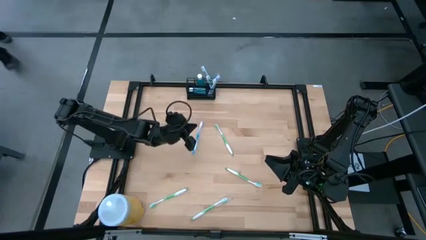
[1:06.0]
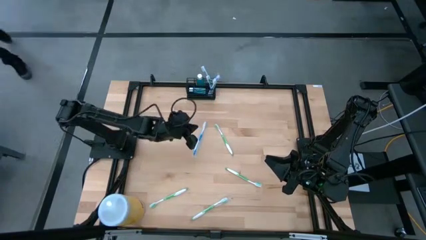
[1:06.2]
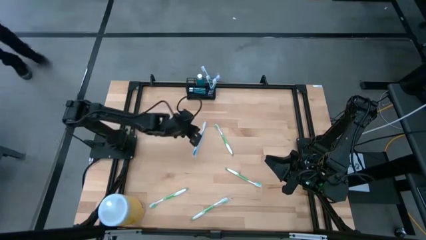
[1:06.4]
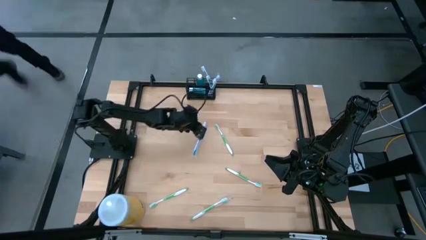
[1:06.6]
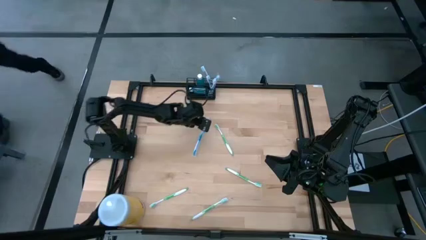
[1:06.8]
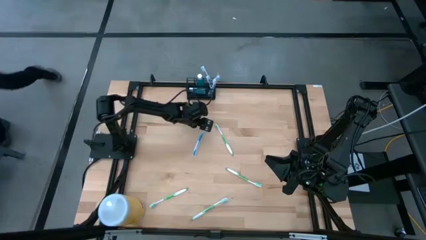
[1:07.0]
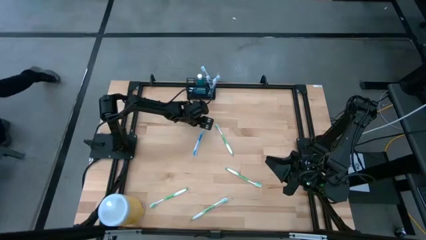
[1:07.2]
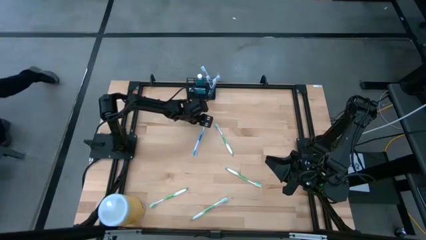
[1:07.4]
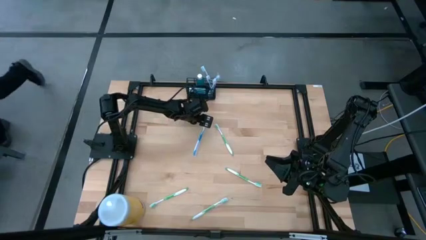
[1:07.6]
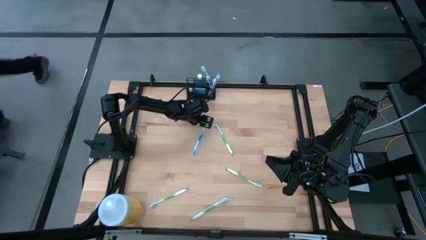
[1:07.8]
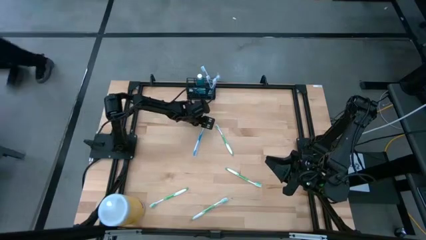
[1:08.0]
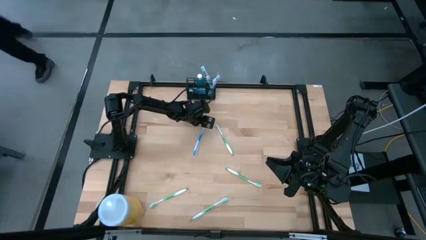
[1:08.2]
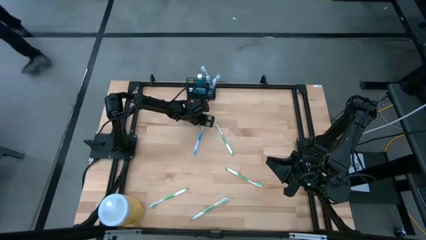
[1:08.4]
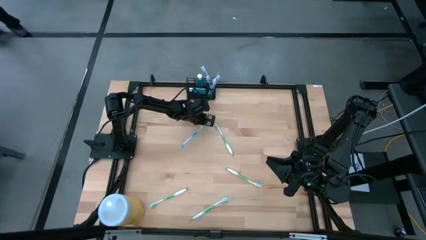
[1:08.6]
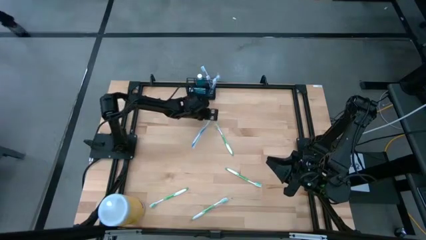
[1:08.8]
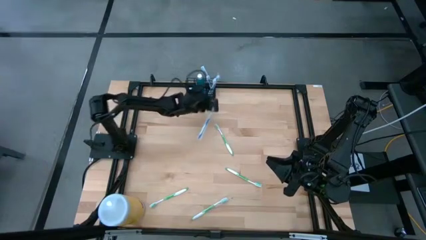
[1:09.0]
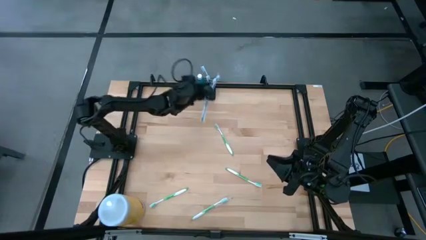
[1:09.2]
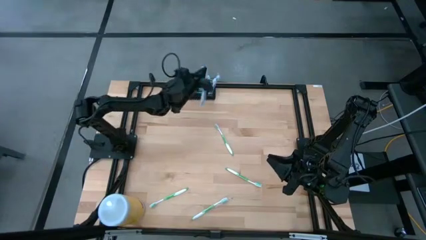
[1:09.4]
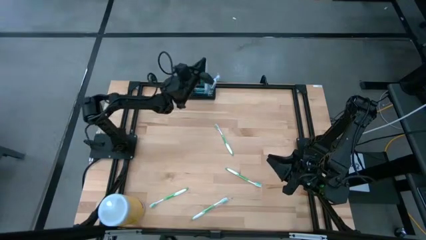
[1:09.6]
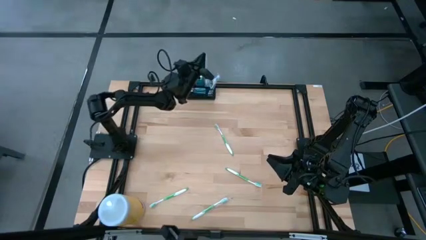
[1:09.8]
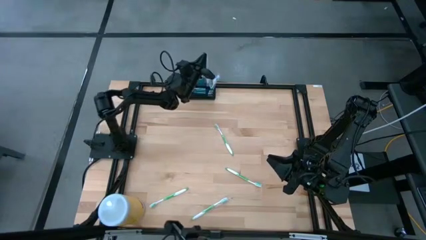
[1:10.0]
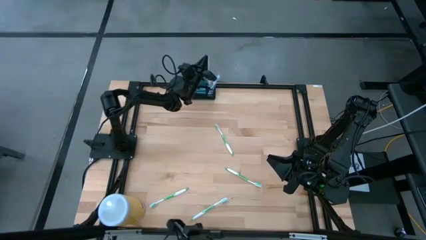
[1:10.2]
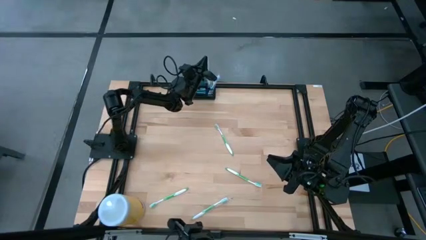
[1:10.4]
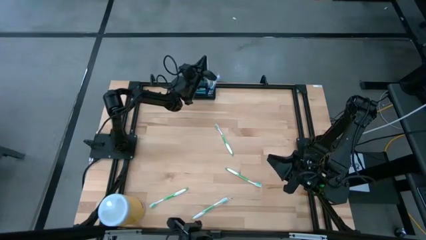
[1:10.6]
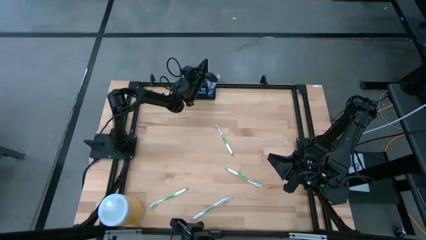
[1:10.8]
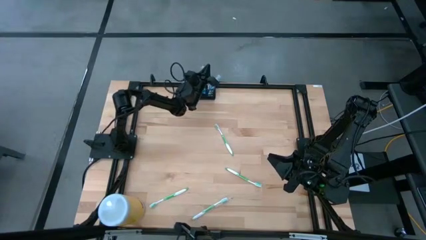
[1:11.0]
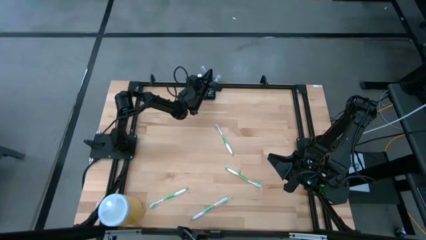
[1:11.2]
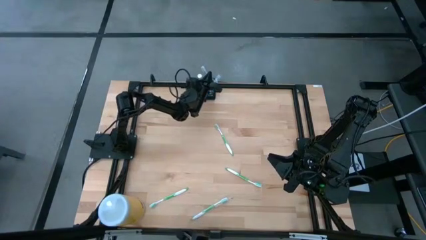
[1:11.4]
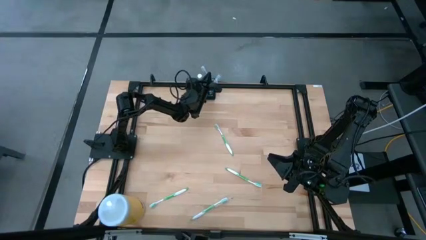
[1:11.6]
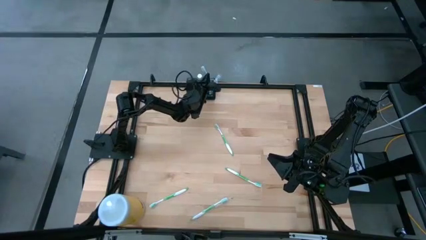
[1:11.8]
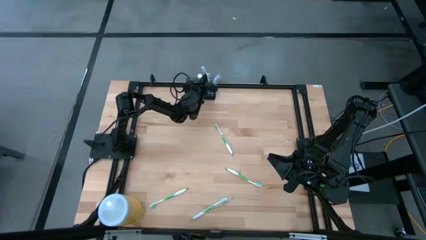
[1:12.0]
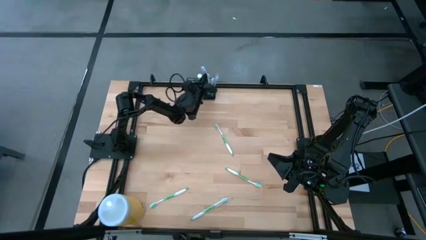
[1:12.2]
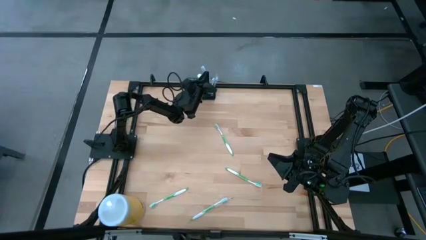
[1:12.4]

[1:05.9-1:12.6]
Task: Pick & Place toothbrushing station
Put the blue toothbrush into the wire organizer

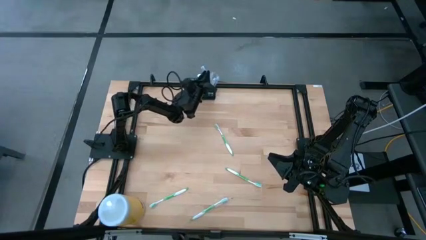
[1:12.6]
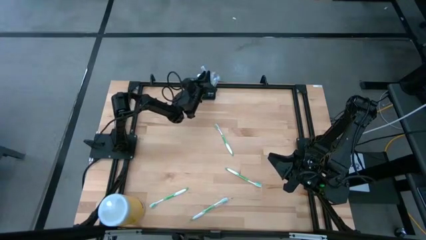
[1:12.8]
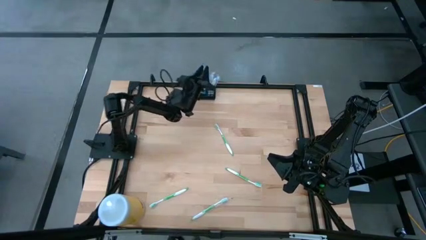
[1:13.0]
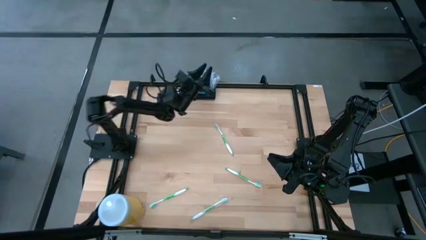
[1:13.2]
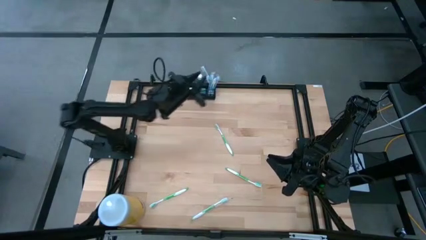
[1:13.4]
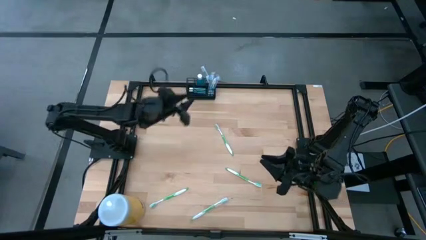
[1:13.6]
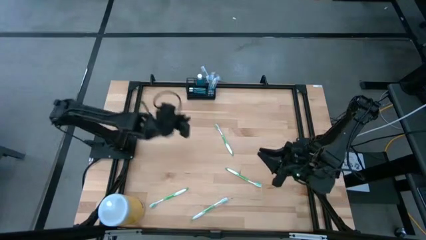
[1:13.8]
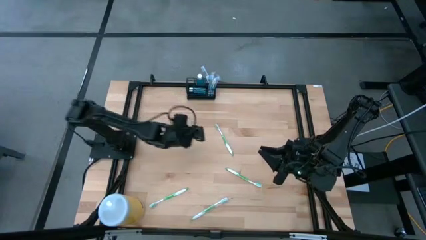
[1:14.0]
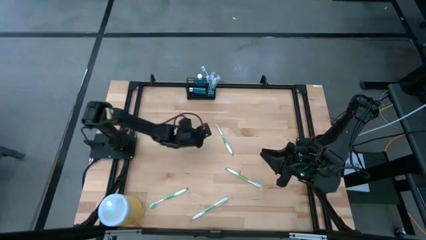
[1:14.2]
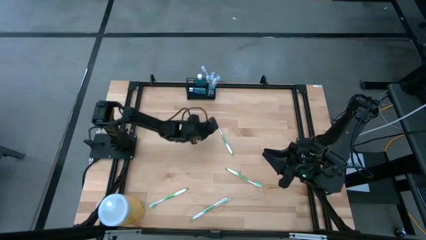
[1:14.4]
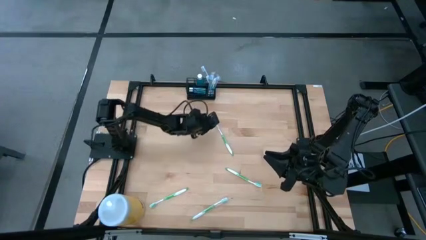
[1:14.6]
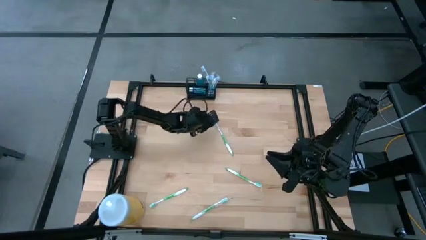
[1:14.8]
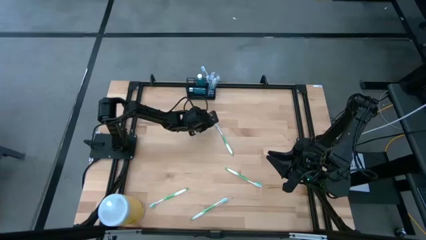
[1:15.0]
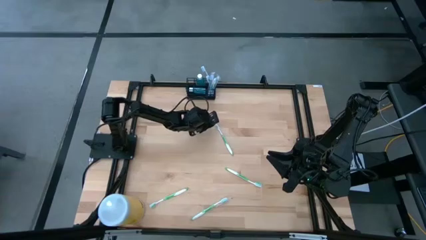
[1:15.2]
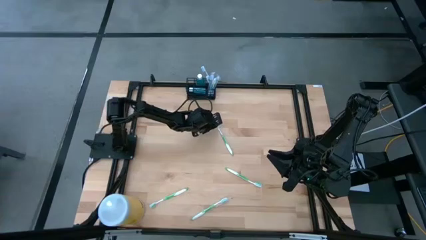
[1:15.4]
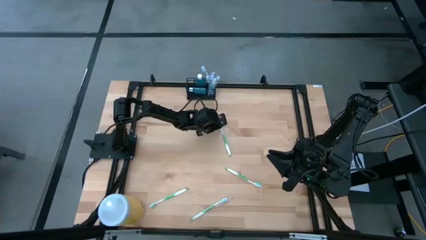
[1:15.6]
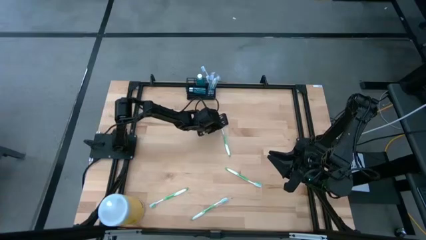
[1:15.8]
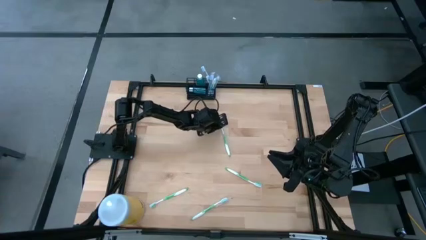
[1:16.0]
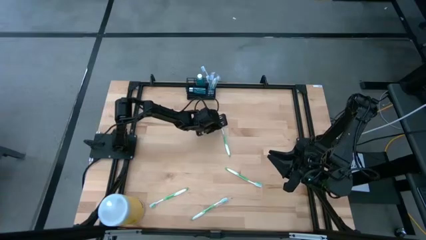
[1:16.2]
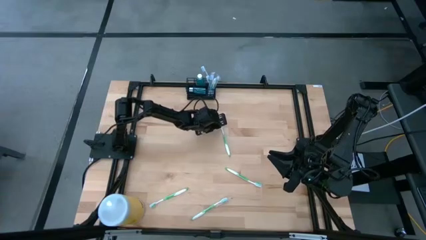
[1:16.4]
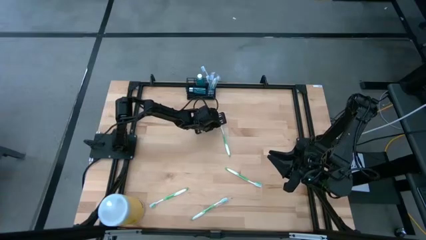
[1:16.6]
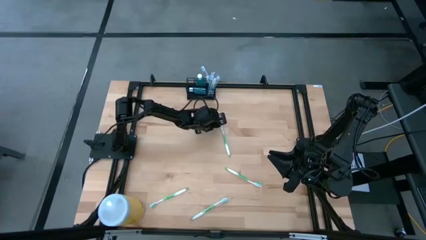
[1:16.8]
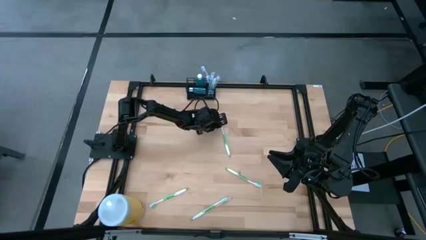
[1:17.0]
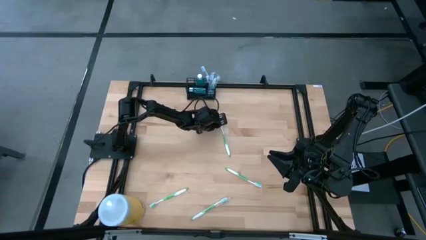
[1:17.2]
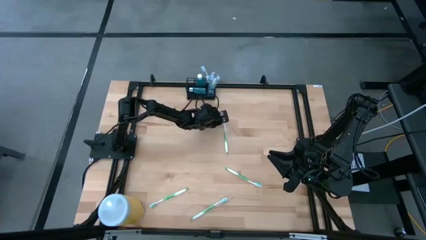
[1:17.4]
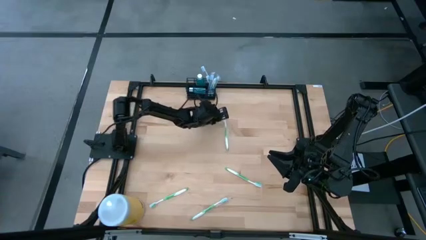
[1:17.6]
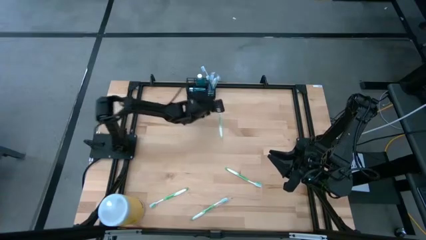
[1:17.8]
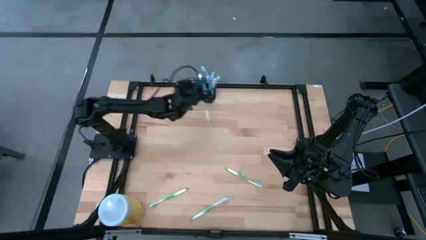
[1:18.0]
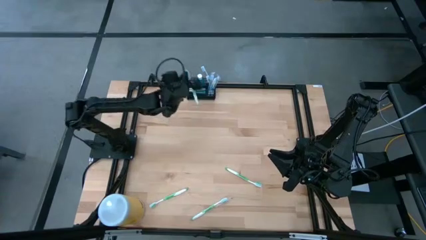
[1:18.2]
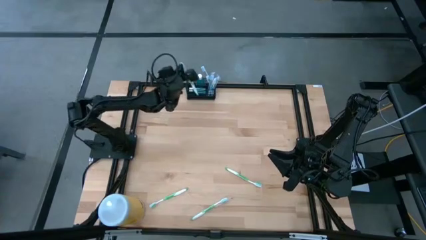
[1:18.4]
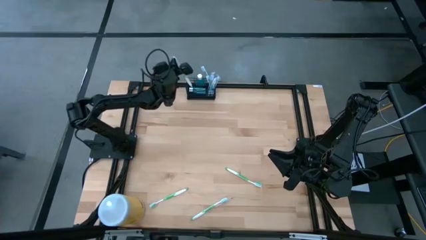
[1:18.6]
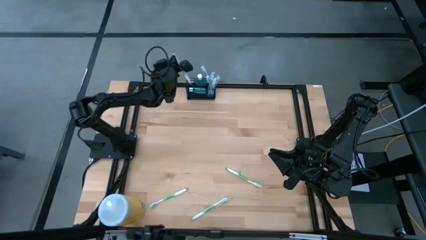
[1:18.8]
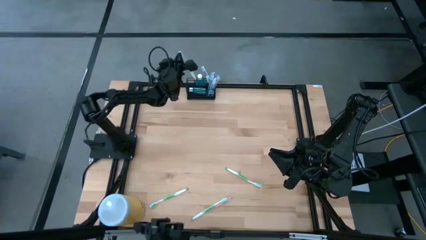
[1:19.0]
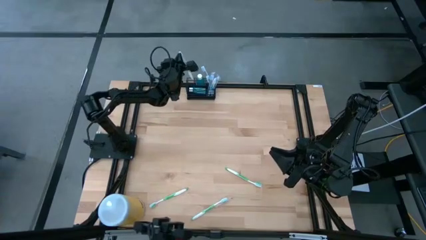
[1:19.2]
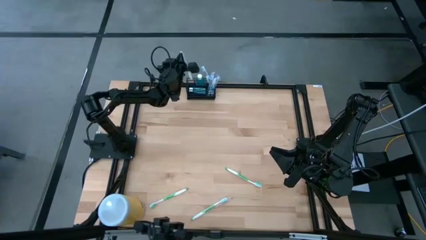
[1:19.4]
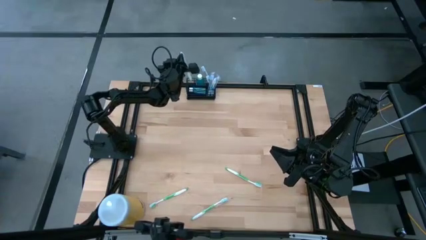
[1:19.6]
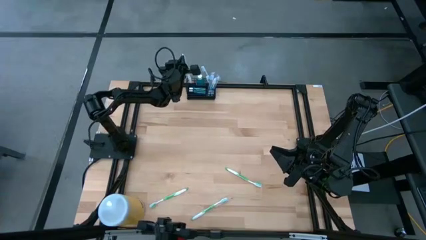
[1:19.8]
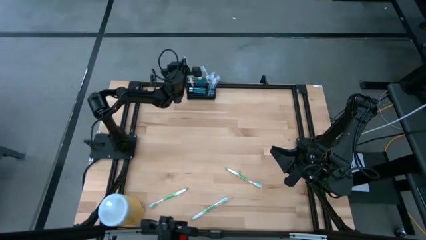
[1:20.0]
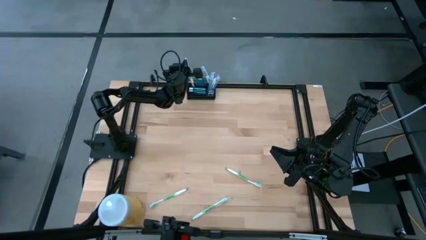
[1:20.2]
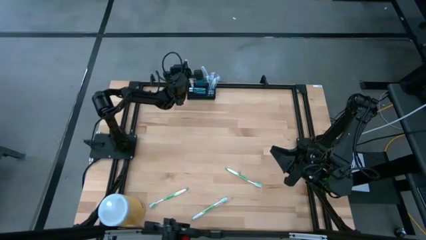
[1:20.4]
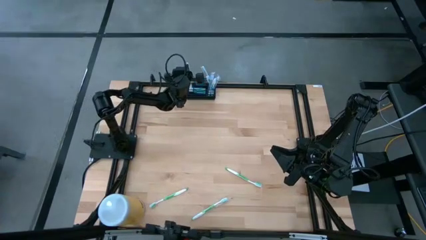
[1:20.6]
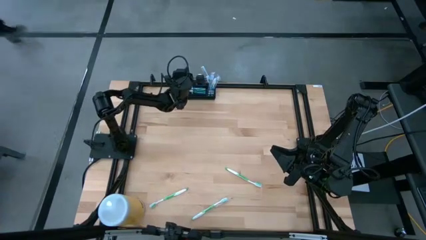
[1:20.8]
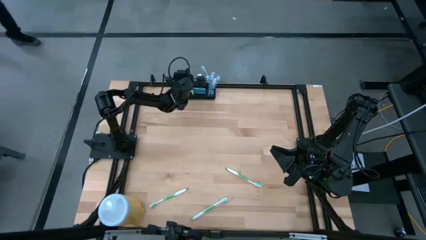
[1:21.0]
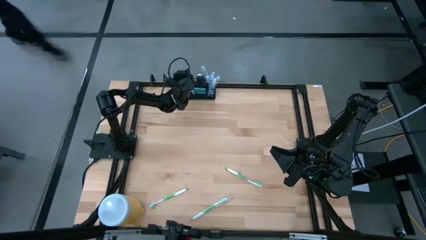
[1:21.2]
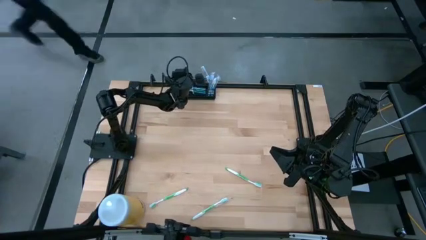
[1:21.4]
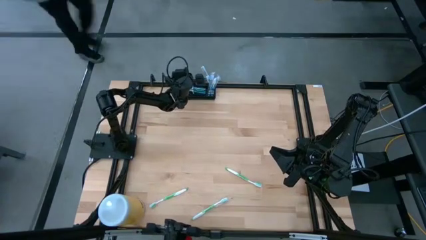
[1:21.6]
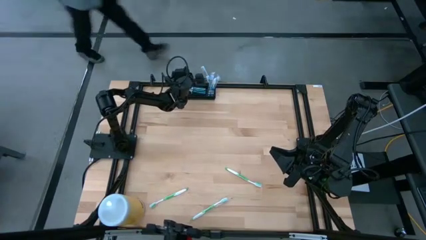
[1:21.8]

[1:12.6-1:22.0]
Put the green toothbrush into the wire organizer
